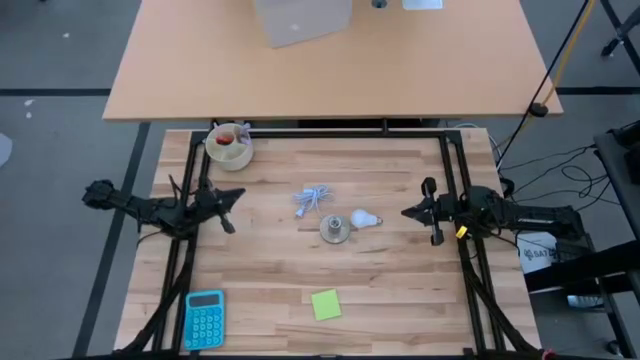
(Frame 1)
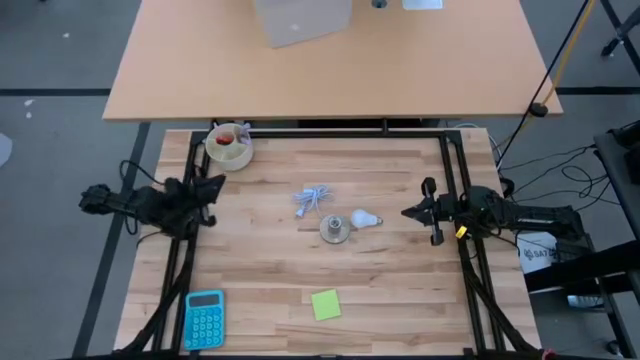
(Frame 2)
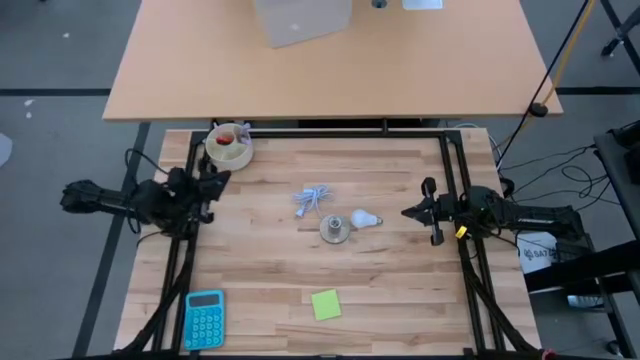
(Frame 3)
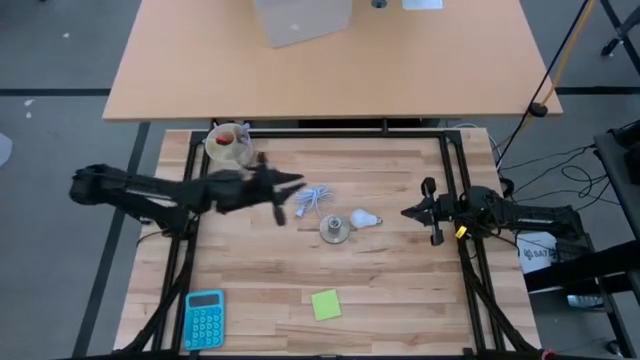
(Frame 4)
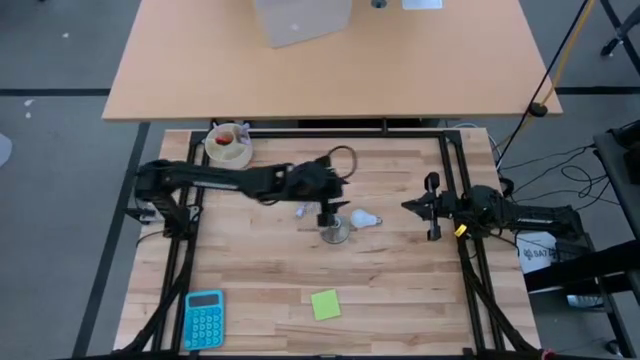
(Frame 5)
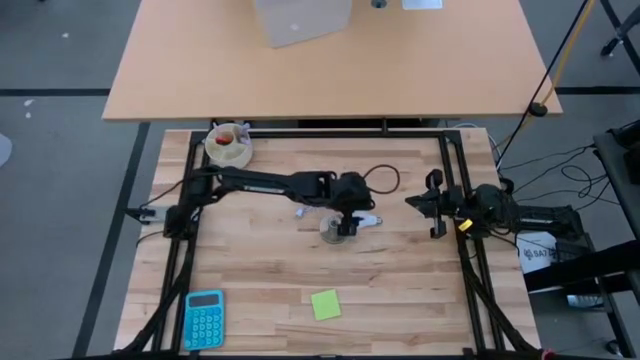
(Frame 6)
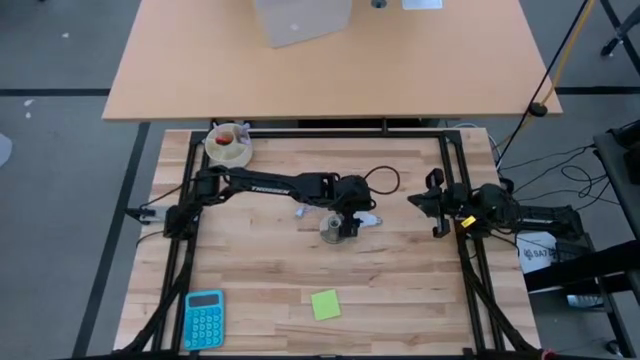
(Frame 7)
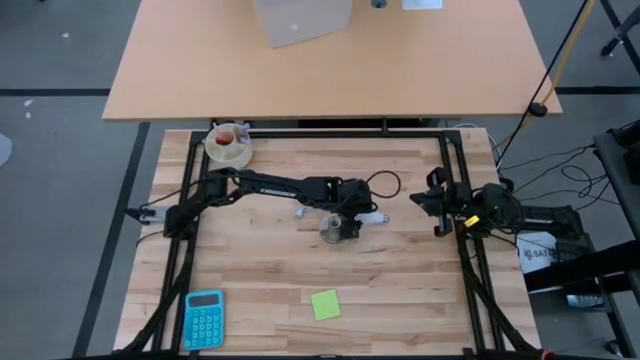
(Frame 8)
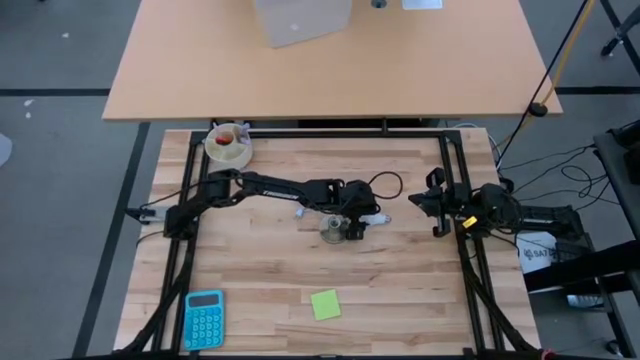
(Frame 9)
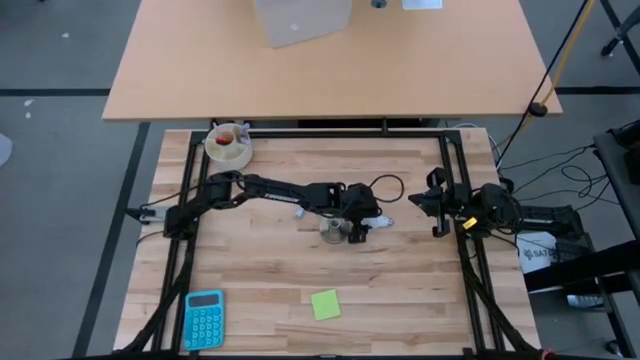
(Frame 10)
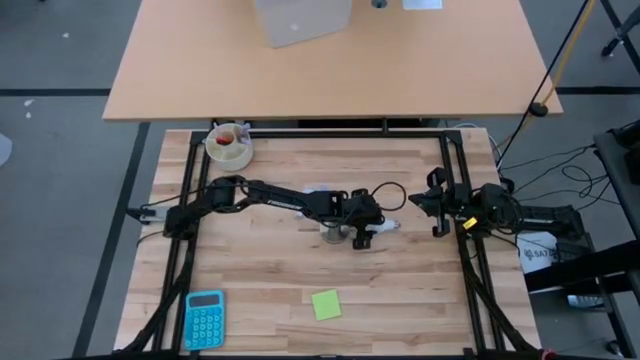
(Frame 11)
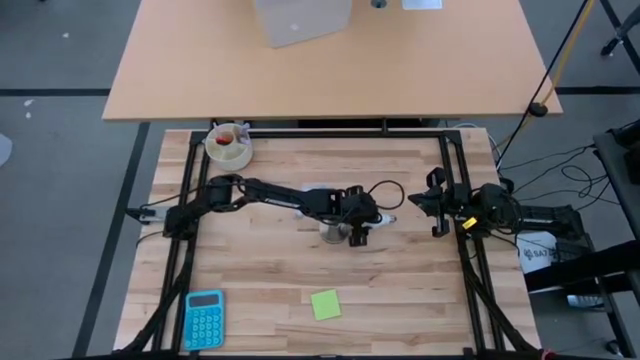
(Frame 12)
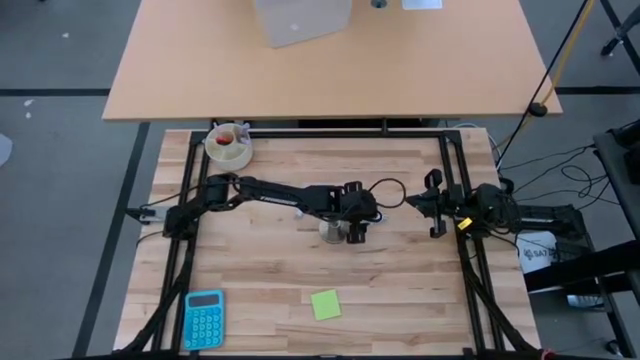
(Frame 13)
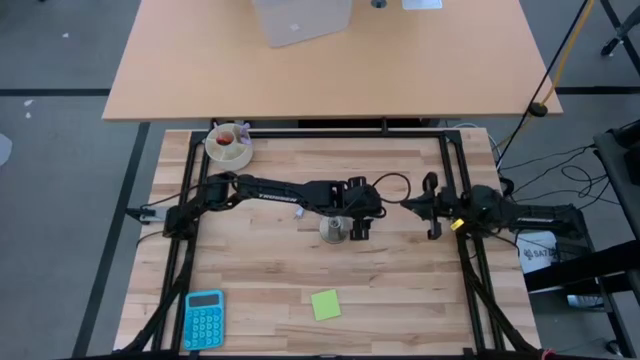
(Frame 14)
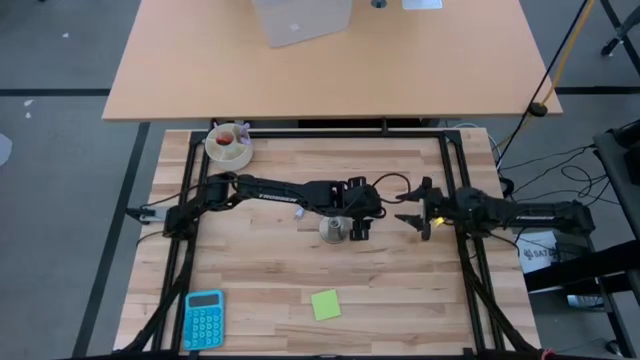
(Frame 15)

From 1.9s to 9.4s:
Task: Screw lightbulb
Insert the lightbulb into the lamp

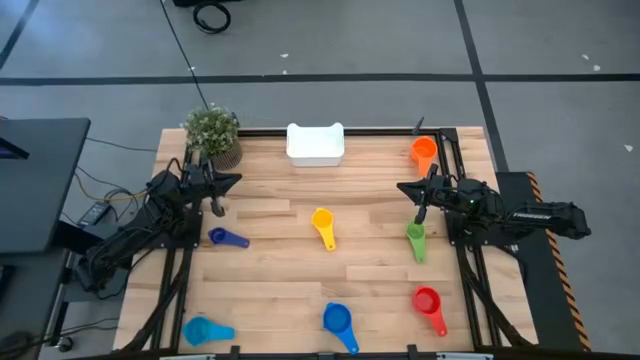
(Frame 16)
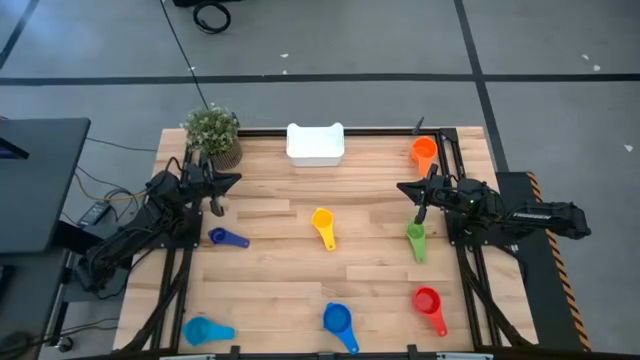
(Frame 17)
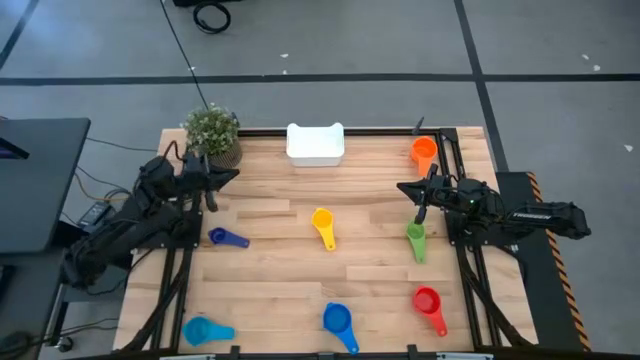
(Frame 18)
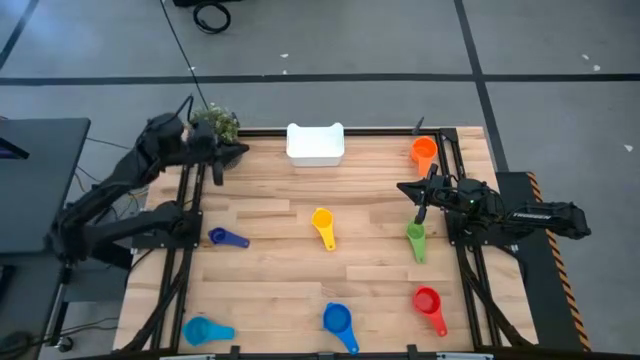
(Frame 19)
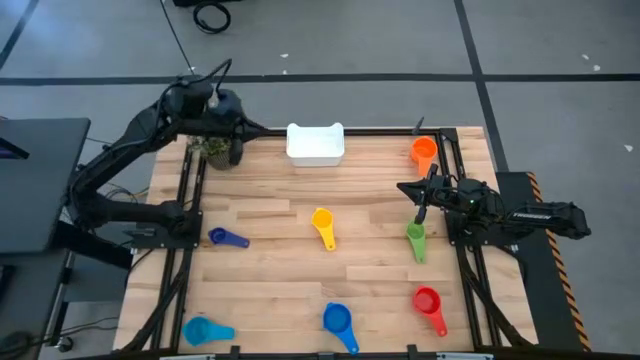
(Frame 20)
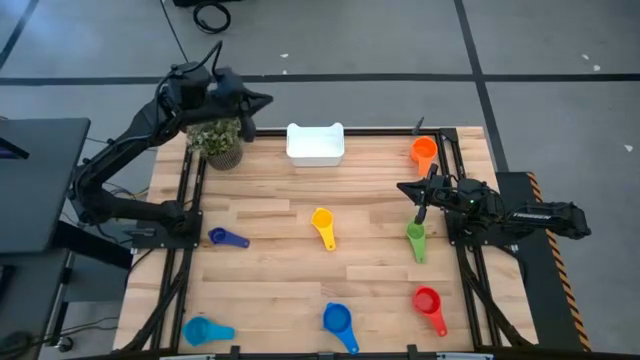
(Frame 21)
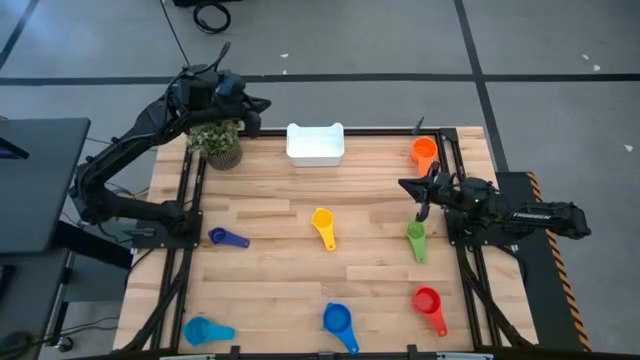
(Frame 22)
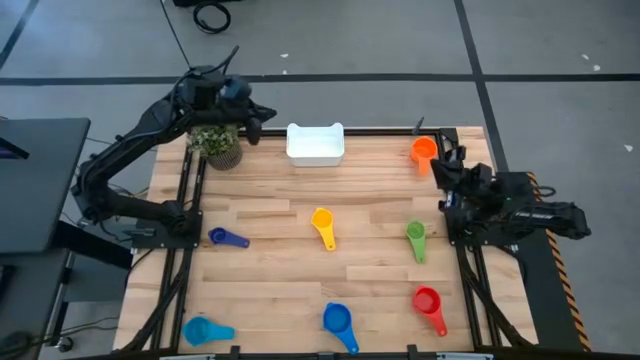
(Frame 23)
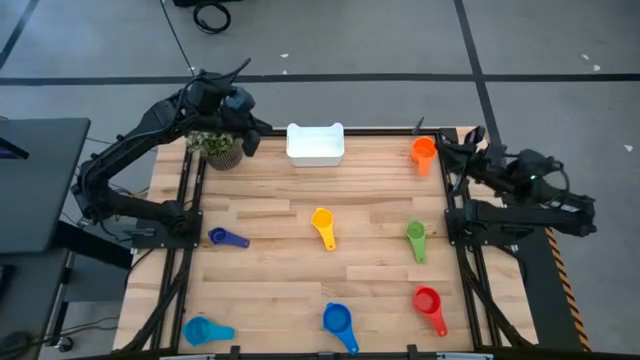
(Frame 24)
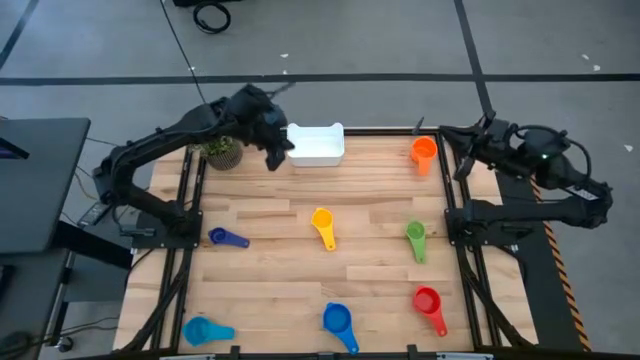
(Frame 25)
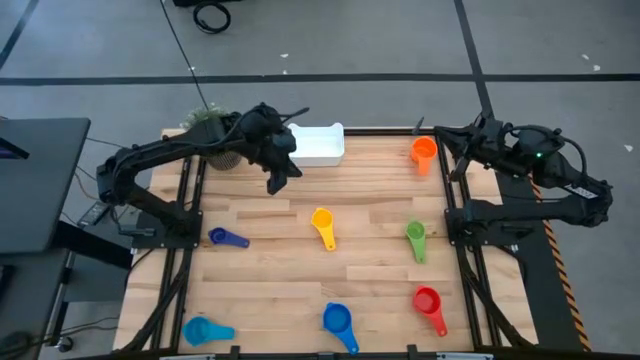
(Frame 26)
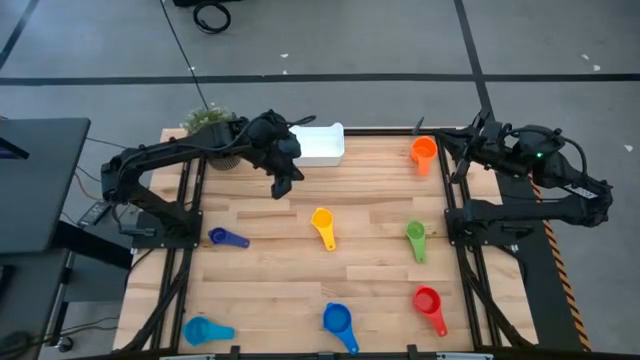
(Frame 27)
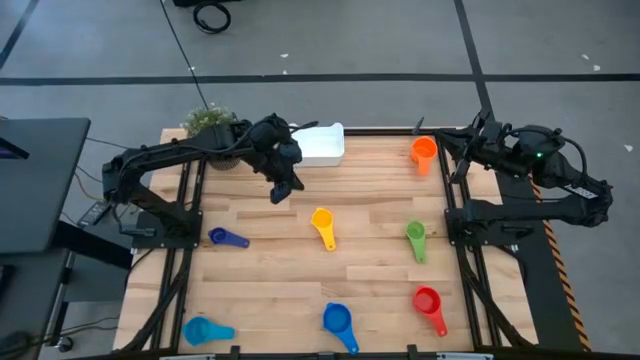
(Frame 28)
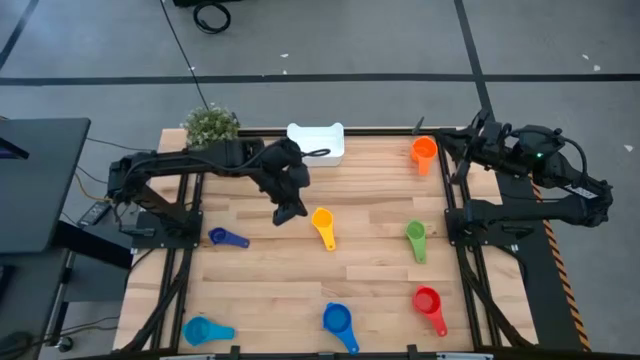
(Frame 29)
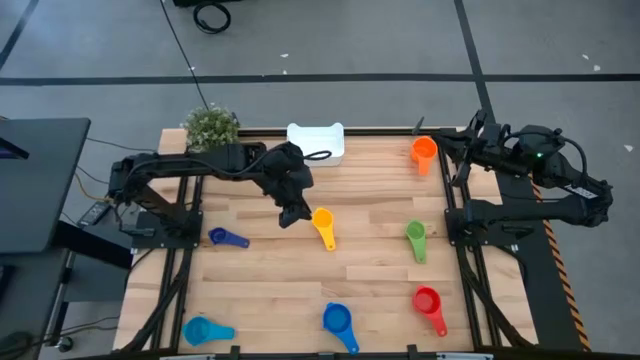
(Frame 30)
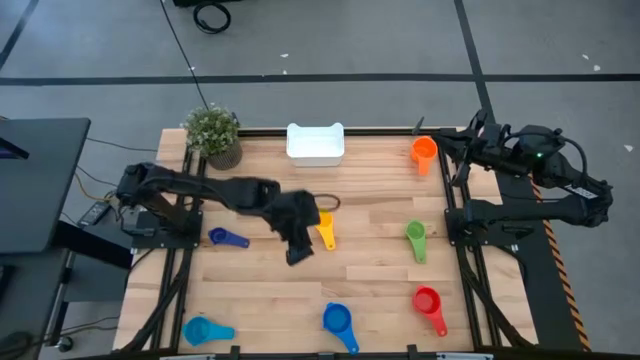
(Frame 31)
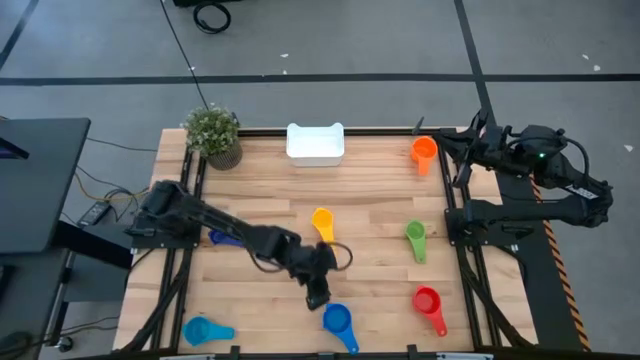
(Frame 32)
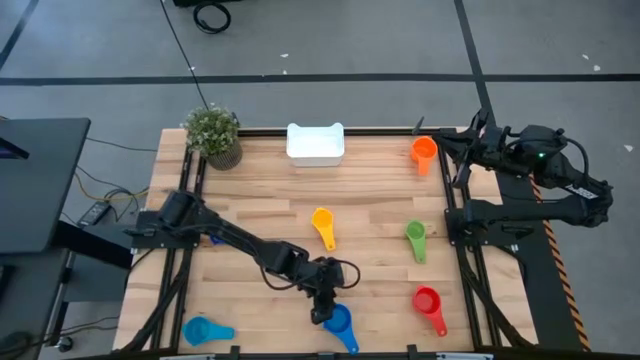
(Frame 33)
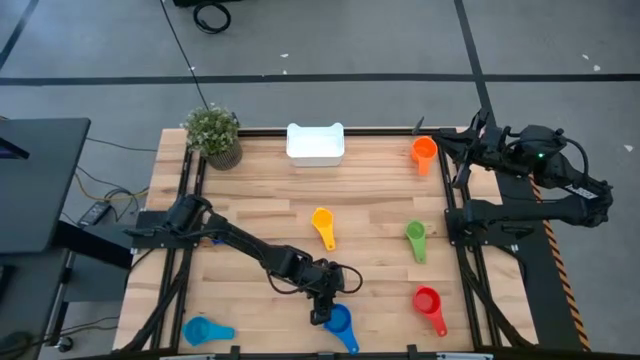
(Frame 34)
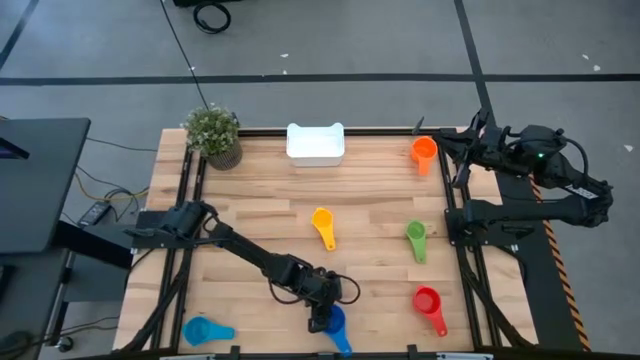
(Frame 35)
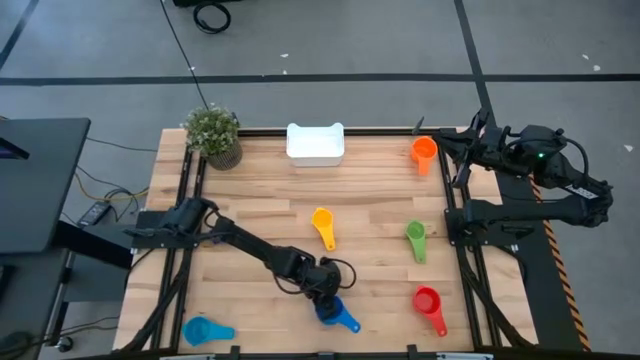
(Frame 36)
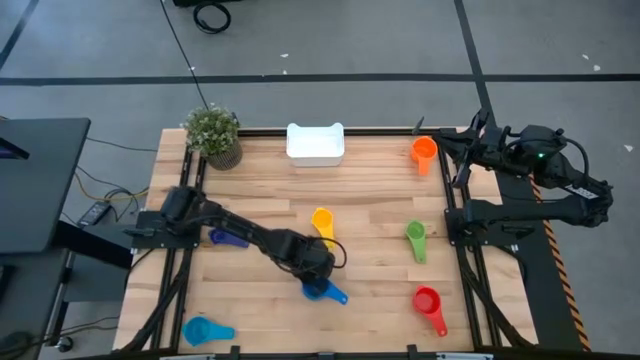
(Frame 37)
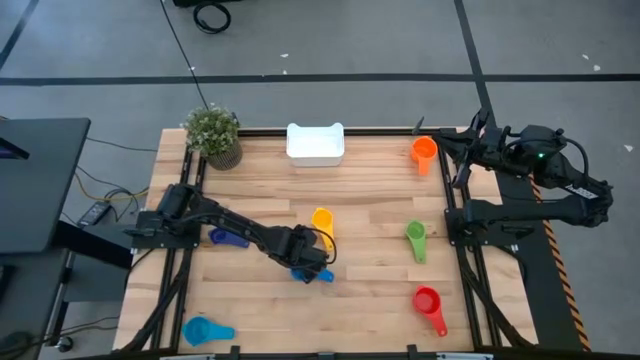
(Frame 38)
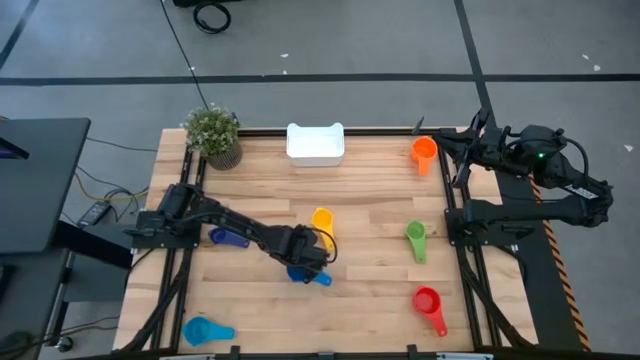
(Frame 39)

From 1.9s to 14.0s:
Task: Nest measuring cups in basket
Move the blue measuring cup
